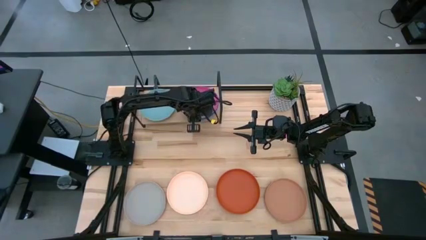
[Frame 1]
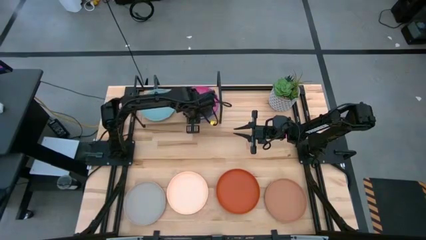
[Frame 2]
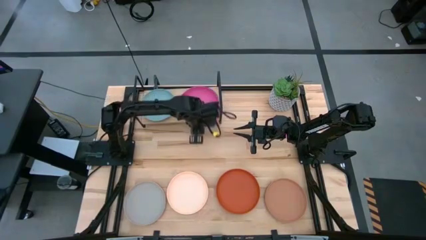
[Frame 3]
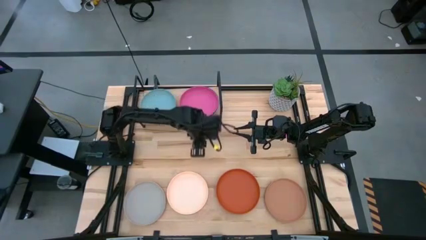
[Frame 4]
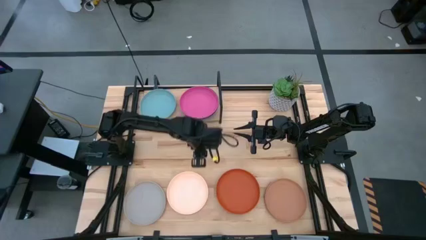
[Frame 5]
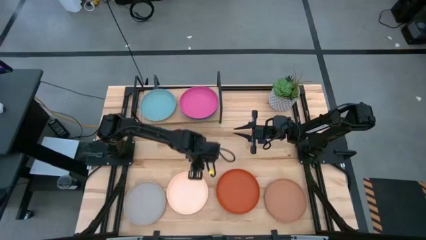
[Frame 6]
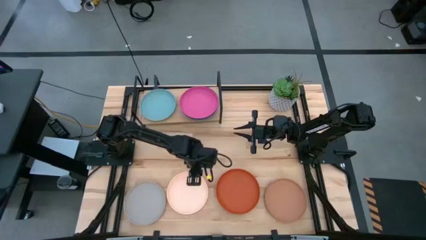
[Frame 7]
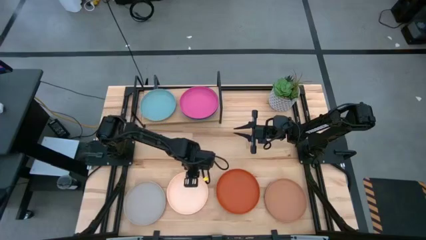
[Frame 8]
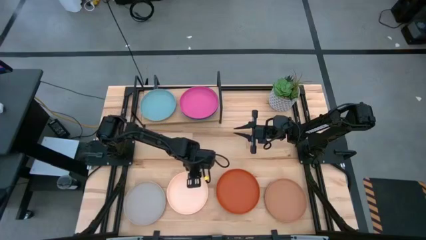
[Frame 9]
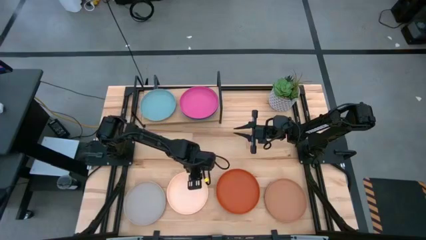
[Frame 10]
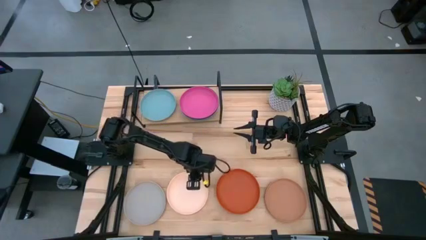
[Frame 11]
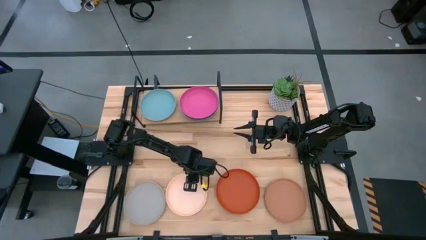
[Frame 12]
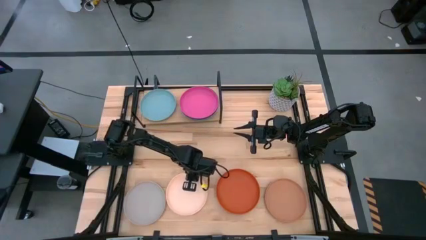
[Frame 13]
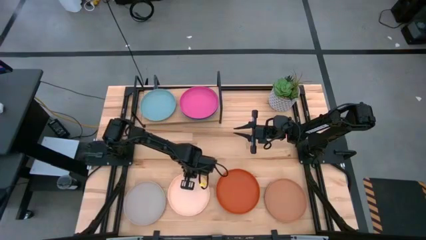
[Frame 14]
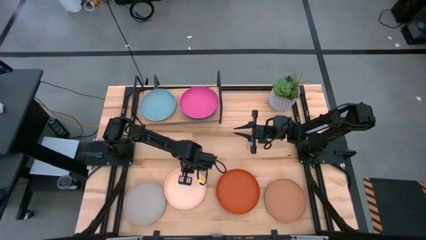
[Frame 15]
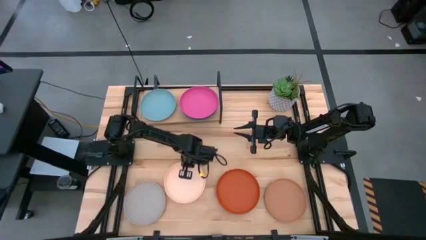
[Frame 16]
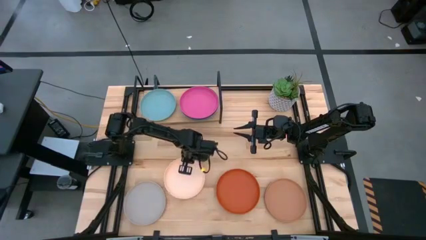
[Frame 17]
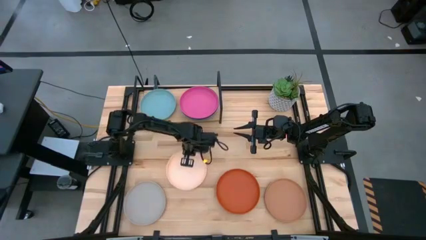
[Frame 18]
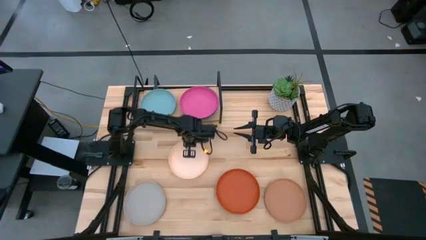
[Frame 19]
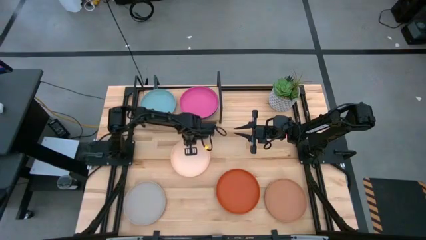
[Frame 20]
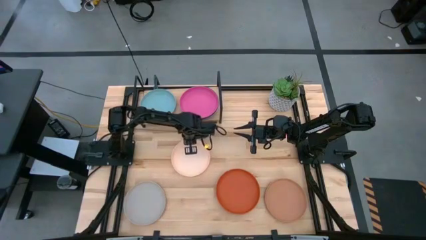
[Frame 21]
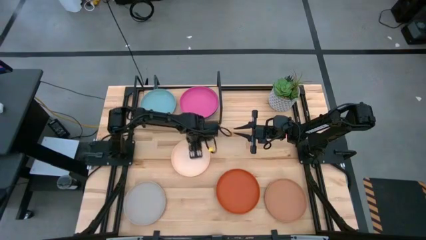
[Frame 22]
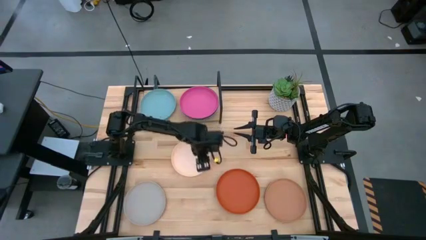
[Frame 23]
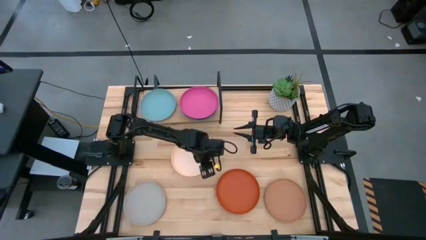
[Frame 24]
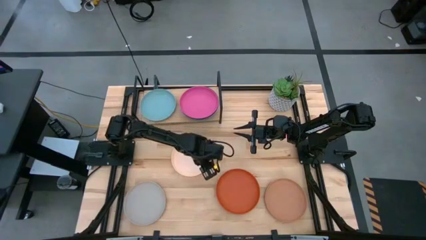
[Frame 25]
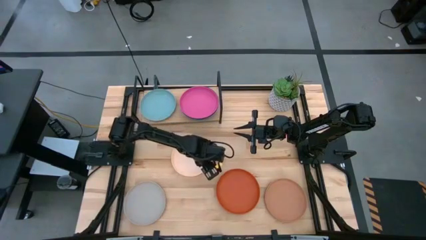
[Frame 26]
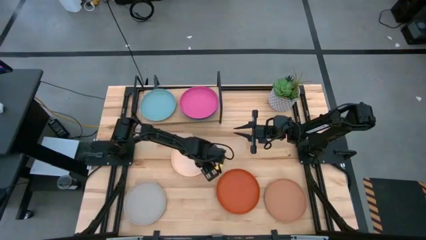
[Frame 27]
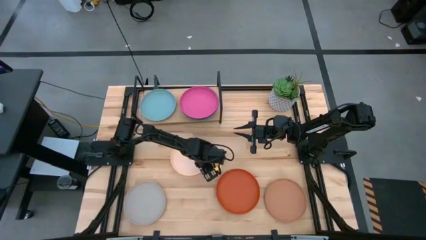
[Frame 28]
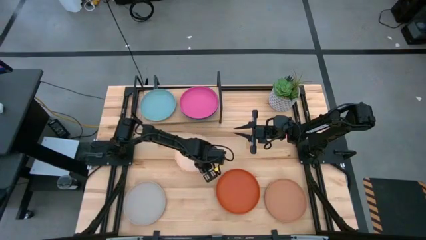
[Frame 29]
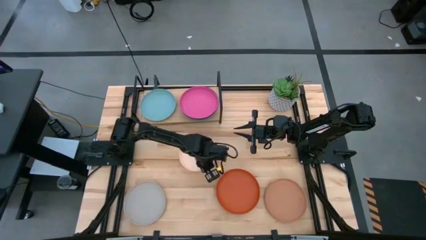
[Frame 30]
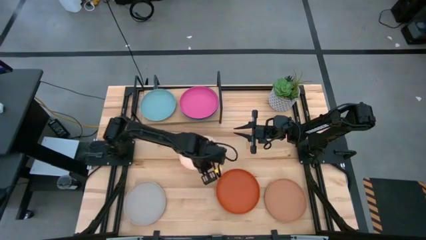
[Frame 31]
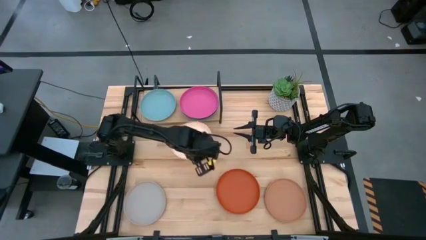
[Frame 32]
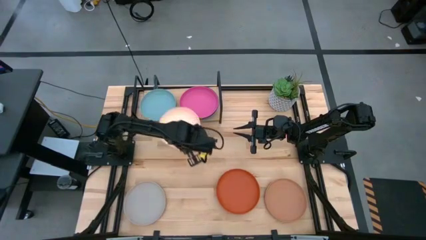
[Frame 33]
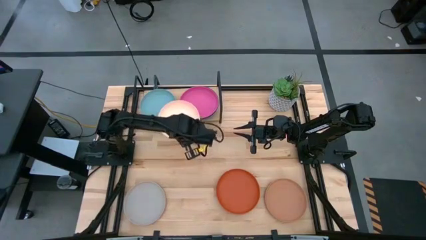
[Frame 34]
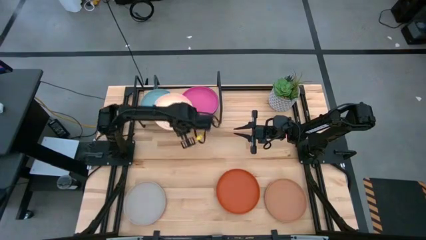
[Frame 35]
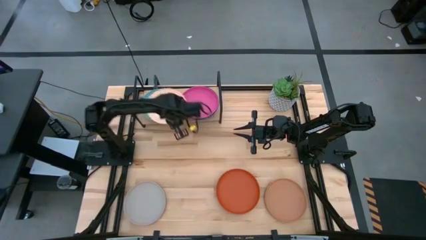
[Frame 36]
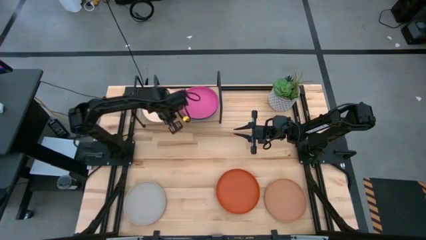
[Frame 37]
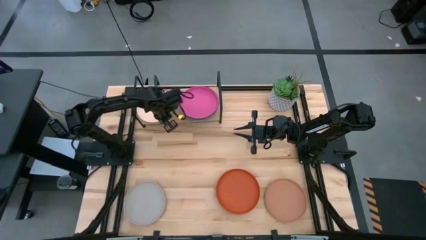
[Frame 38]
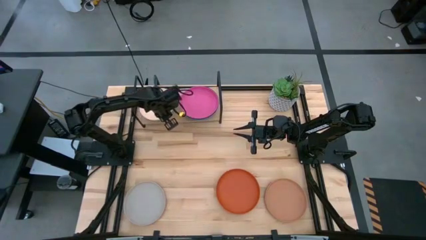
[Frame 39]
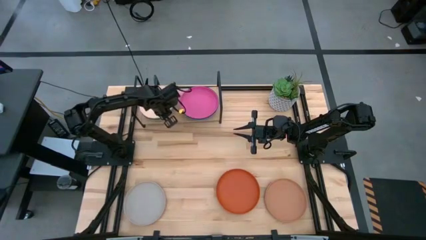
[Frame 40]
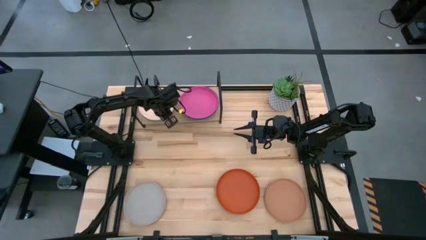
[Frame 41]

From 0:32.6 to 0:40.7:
Task: Place and stack plates onto a shelf
Stack the light orange plate on top of the light blue plate on the shelf

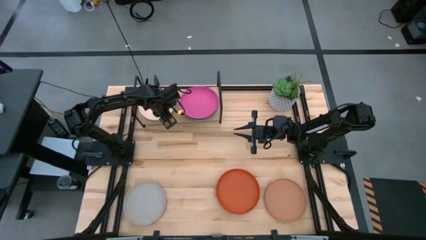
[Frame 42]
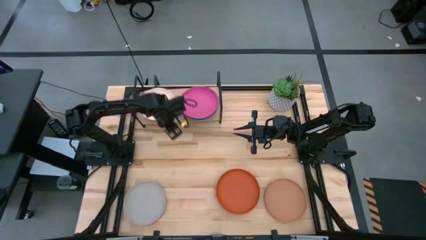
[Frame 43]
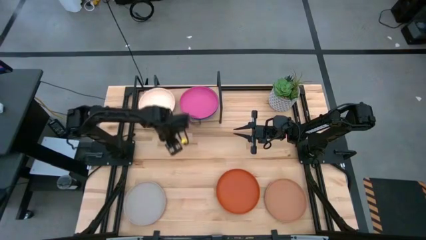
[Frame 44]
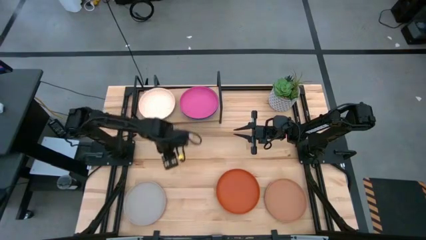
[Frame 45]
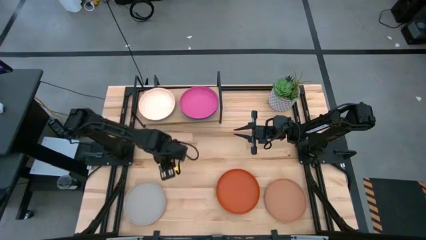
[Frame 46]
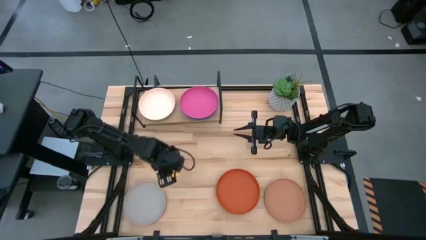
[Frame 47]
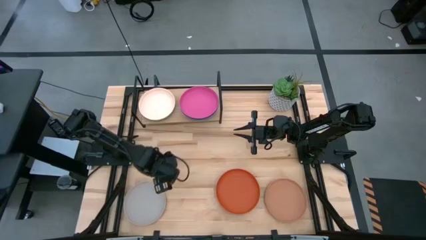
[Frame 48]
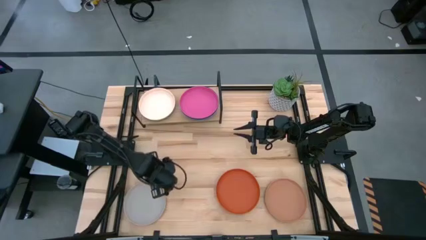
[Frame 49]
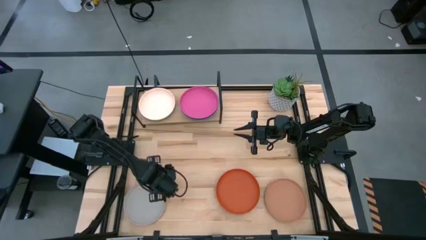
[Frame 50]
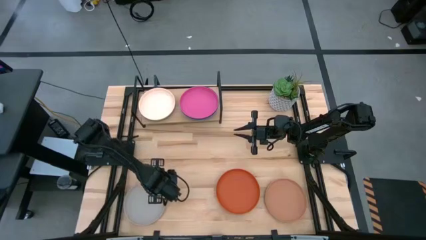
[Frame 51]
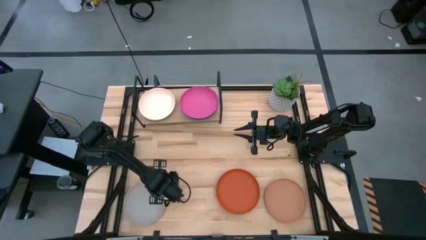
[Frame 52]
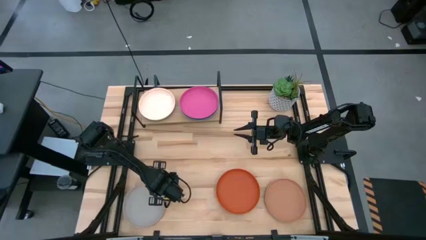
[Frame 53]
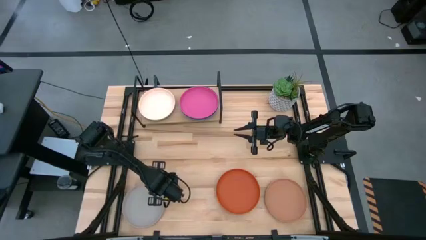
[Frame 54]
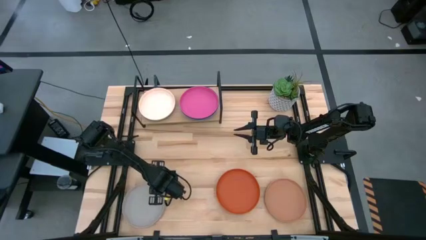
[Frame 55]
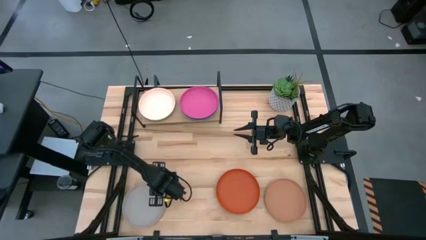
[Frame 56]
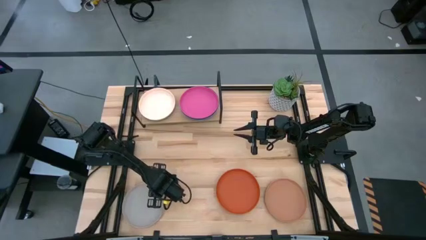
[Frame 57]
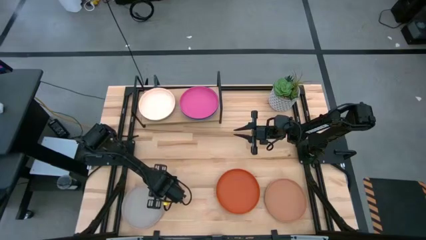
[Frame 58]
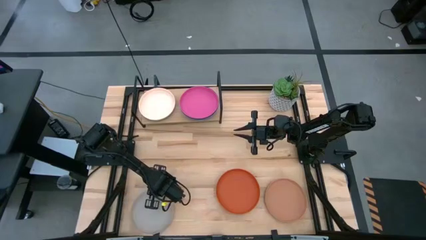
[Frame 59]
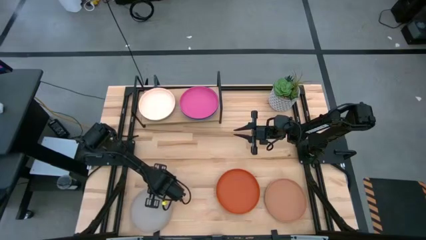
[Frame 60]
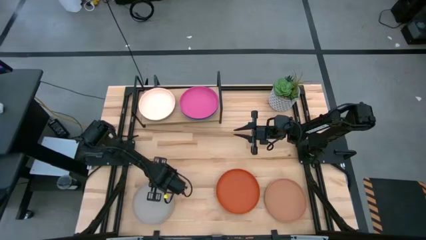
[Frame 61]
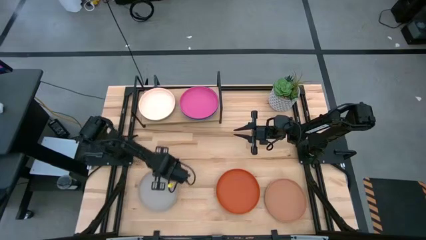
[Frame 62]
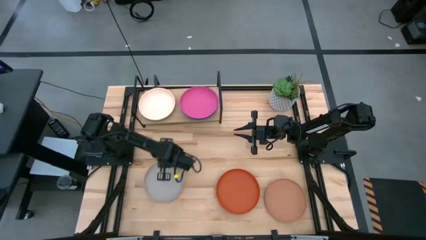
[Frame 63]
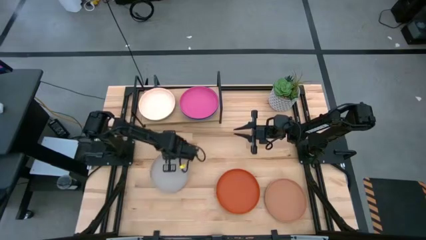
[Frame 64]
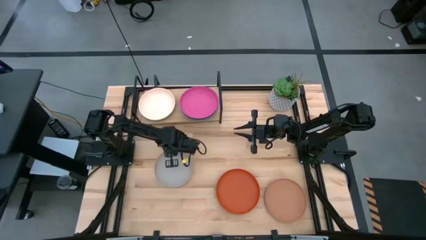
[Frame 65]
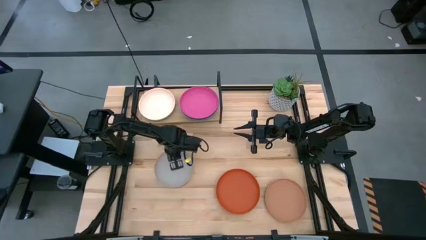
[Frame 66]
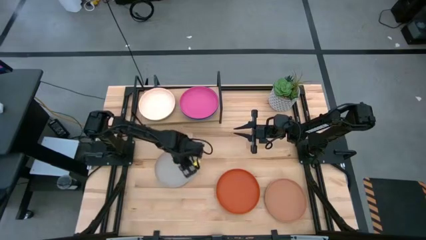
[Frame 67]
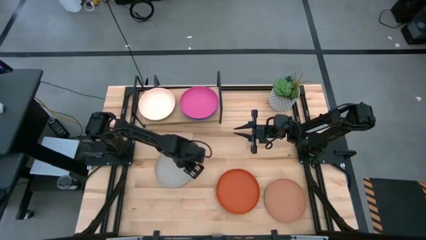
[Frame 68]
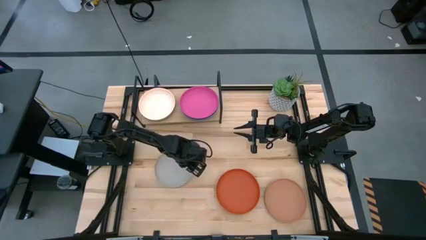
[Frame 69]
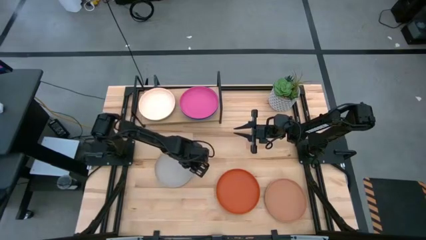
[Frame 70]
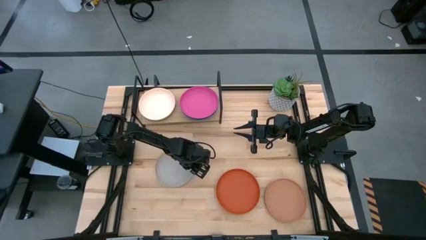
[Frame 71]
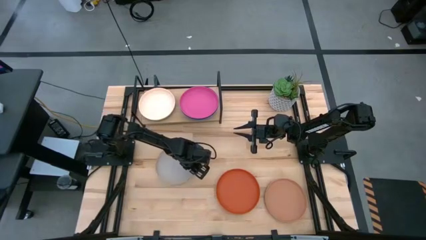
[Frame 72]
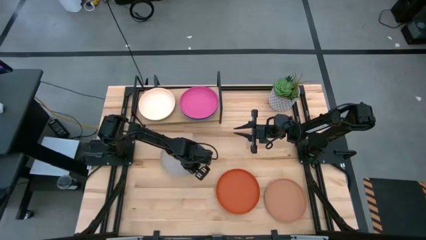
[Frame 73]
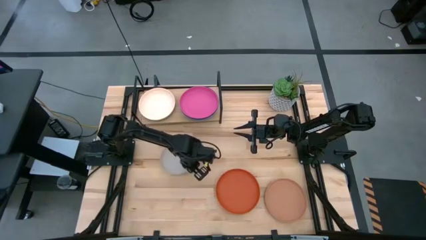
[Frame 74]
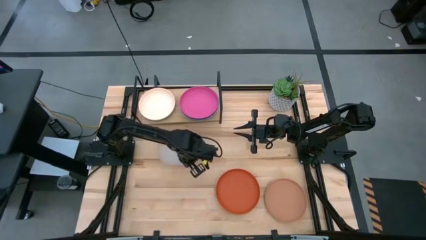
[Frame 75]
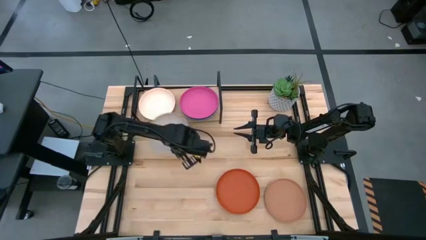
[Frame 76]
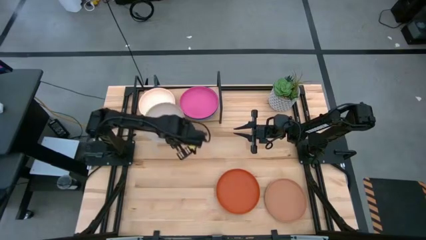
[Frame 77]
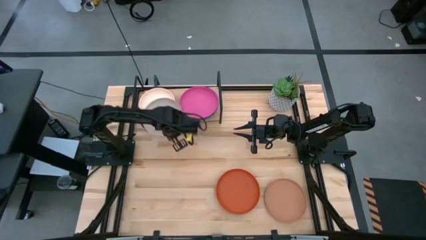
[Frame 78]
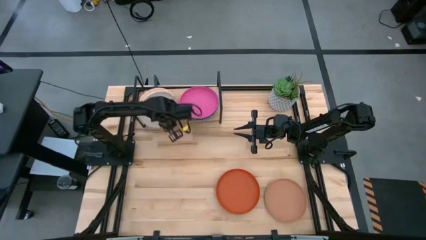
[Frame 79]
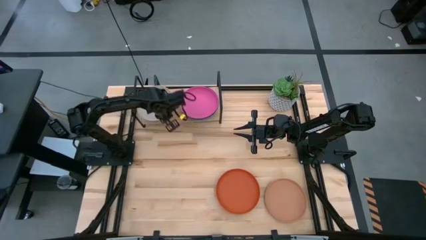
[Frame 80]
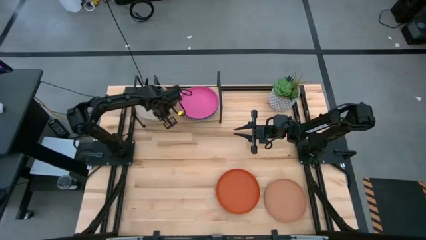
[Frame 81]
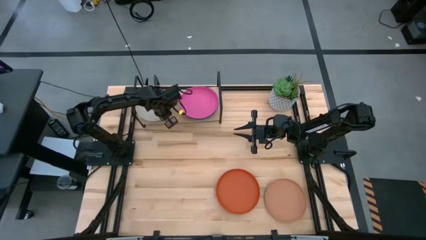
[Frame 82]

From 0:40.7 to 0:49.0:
Stack the gray plate on top of the light orange plate on the shelf

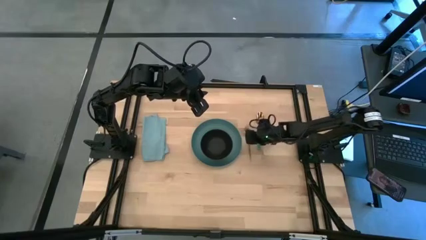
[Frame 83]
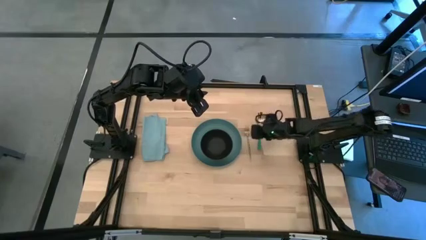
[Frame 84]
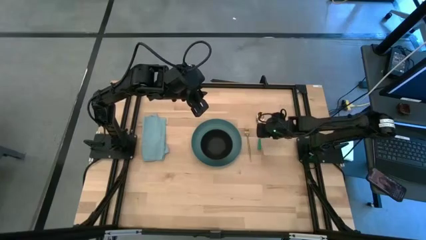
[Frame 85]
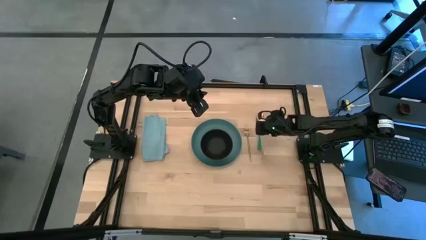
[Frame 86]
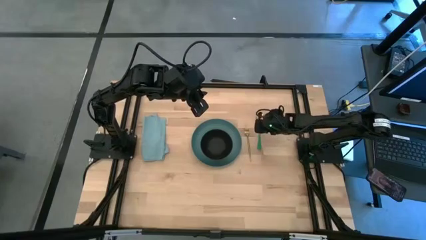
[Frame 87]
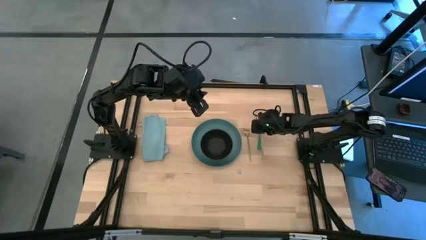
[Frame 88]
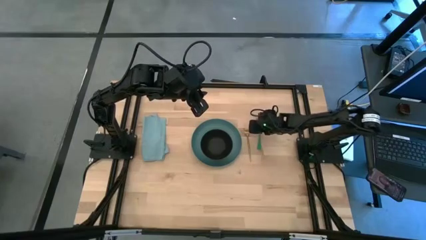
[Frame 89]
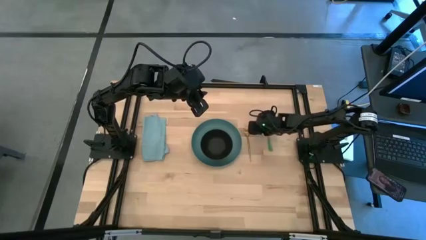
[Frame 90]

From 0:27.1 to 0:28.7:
Task: Set table place
Put the green spoon into the black bowl
